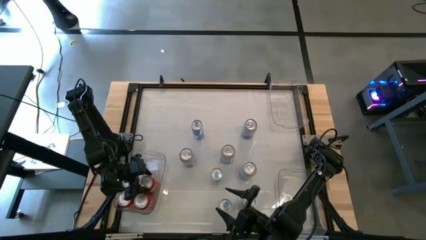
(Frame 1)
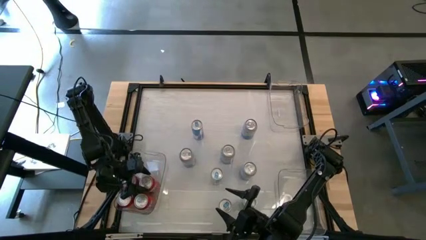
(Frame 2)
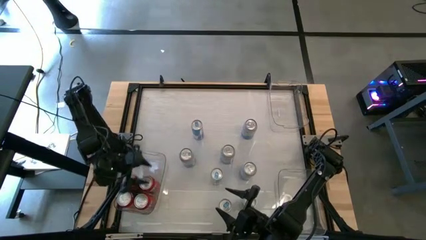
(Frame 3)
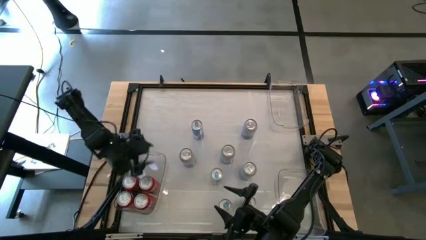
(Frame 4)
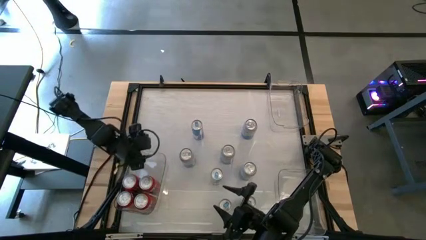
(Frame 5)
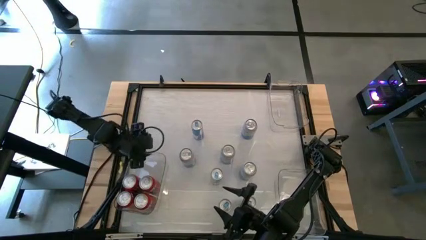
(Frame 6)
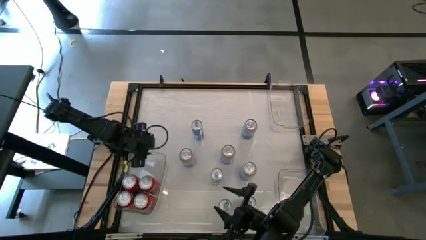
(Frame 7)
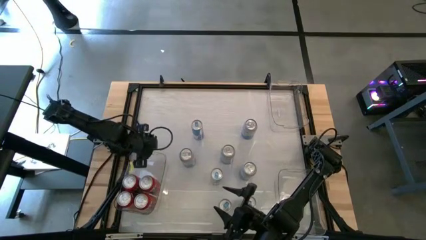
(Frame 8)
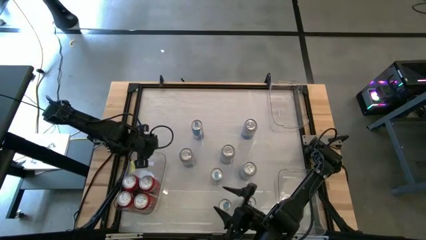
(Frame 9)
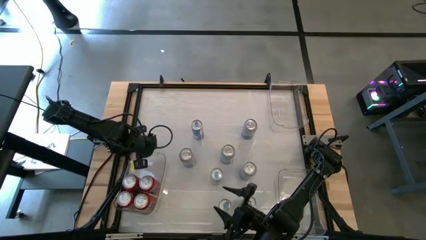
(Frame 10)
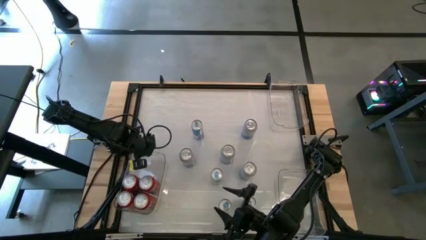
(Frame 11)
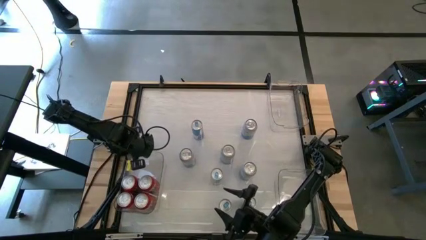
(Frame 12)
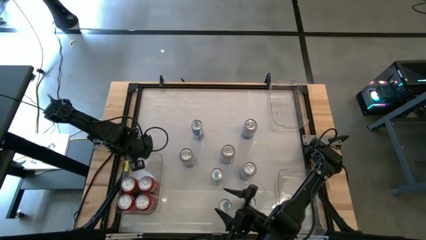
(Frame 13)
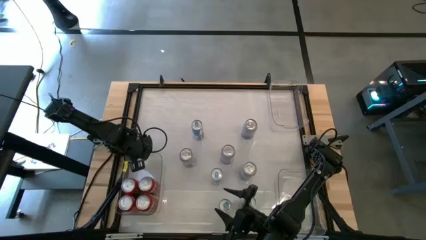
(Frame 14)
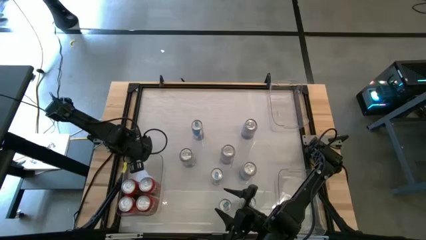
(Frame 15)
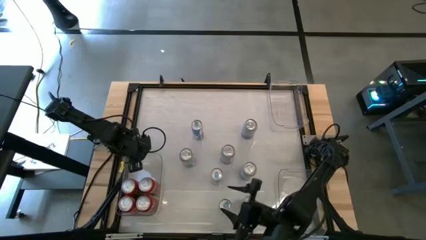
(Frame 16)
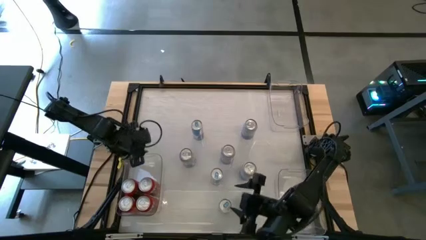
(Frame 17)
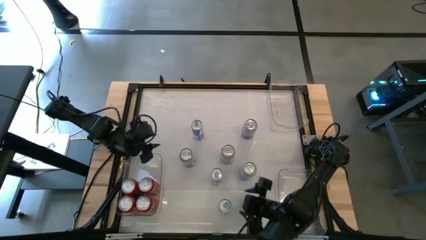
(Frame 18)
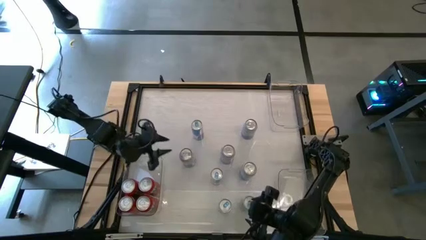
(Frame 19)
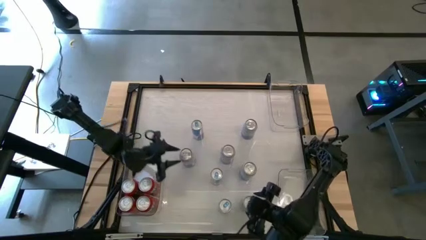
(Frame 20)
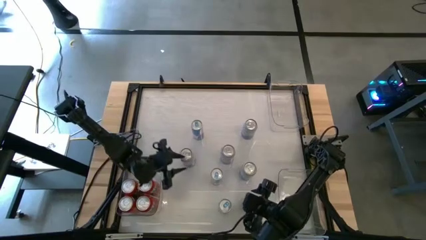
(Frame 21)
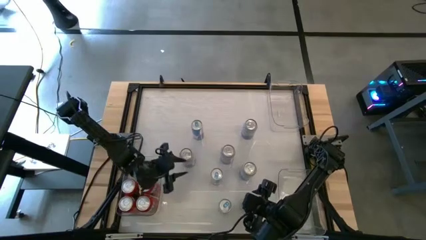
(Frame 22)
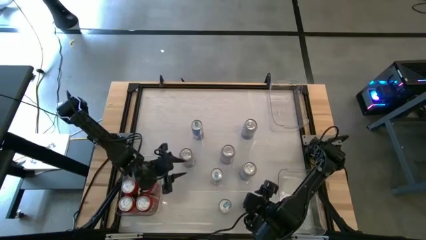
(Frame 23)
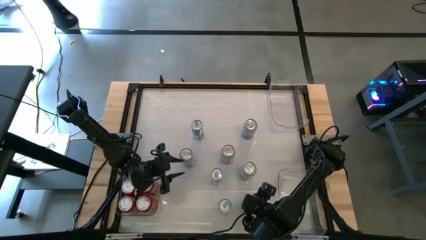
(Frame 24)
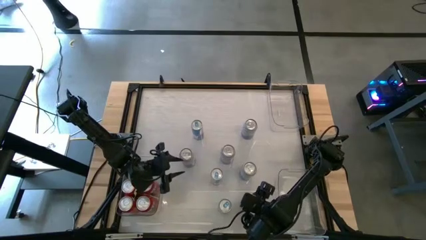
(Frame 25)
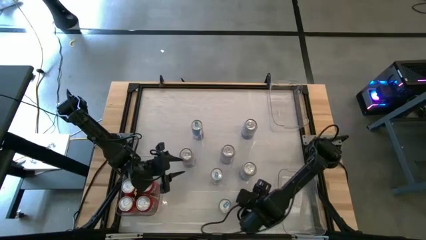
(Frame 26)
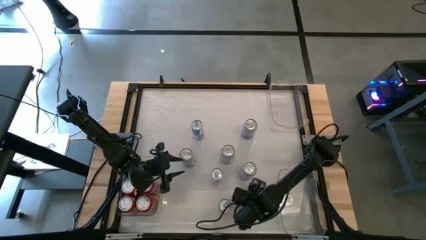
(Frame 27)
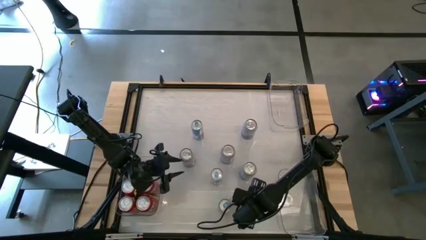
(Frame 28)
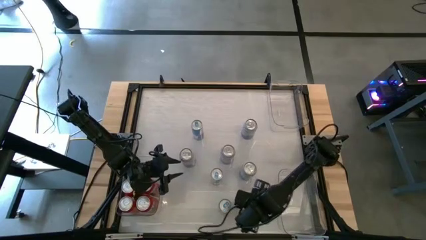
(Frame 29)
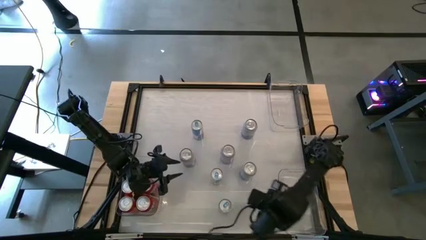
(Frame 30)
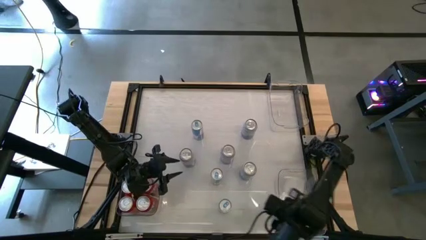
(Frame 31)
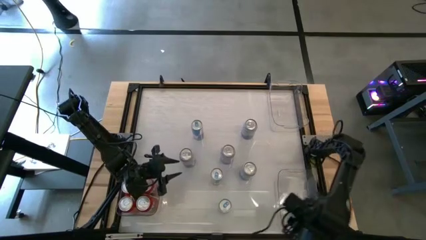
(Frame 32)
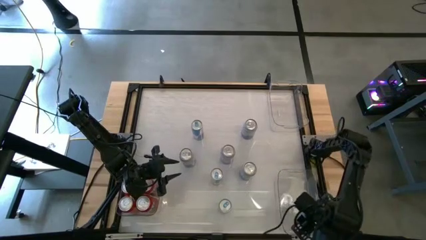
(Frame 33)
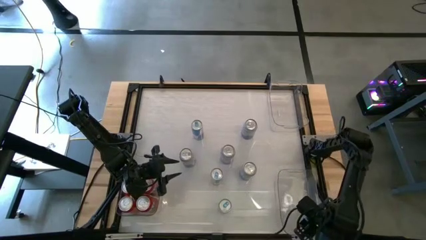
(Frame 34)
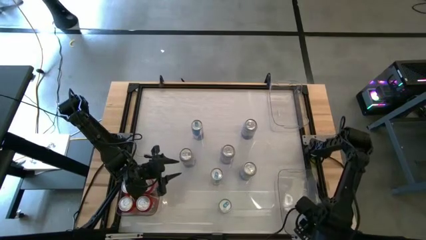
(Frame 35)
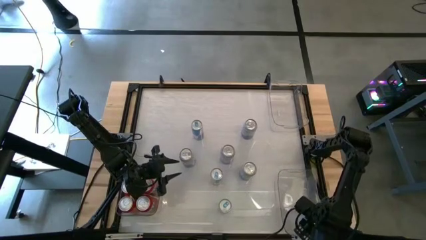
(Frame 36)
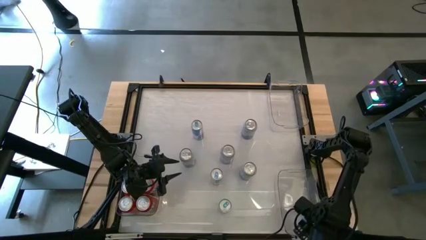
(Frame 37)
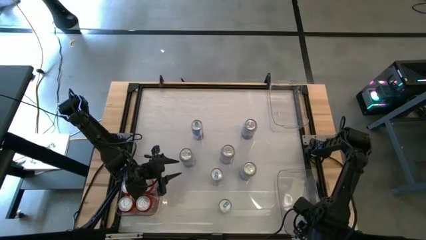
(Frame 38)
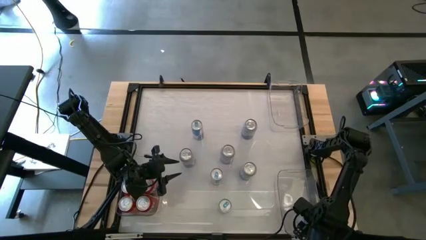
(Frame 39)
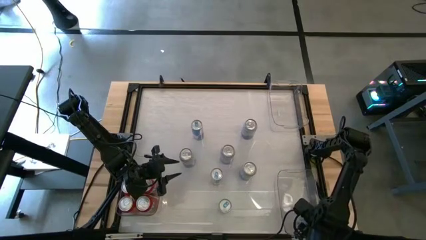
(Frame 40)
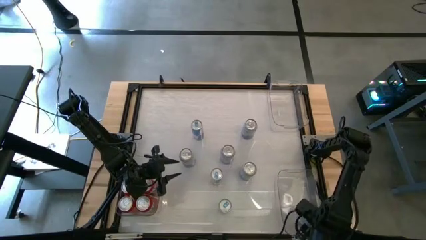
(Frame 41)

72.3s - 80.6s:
Task: Sort soda cans
Put the bottom right blue soda can into the bottom right transparent bin

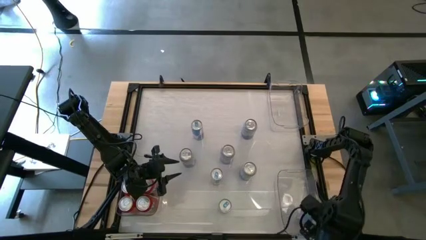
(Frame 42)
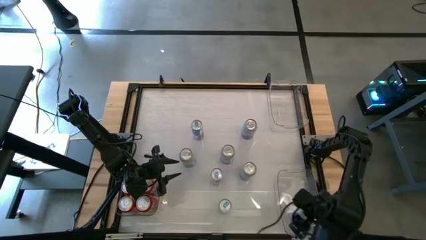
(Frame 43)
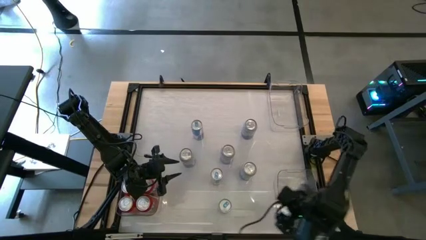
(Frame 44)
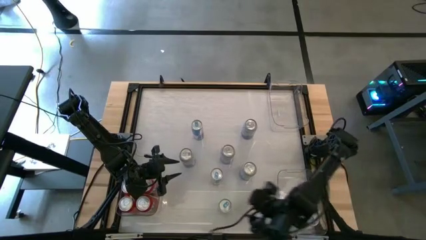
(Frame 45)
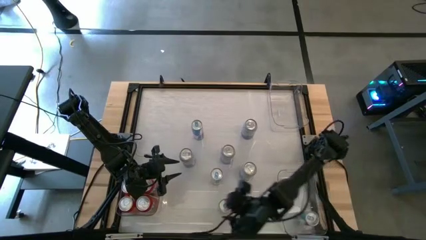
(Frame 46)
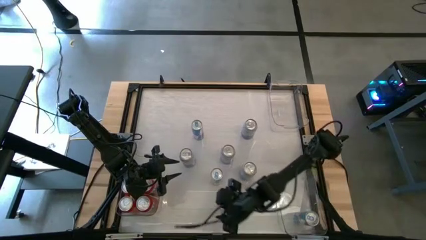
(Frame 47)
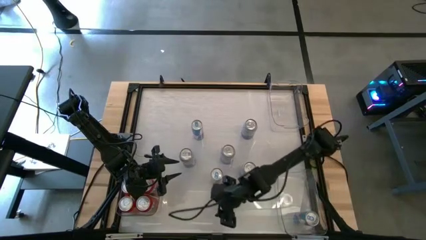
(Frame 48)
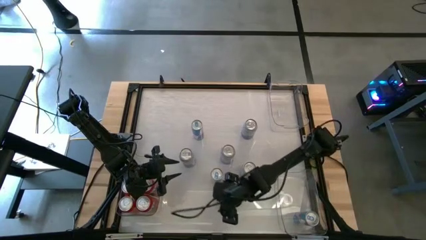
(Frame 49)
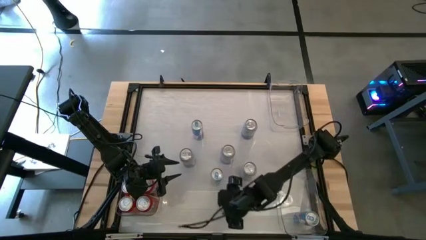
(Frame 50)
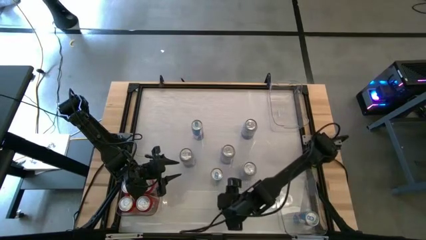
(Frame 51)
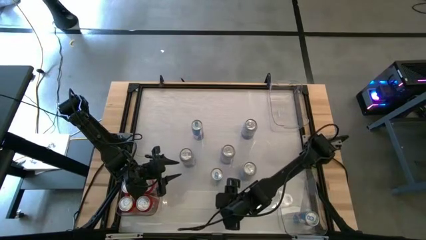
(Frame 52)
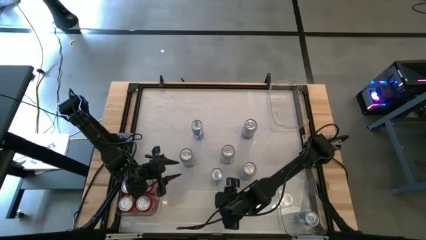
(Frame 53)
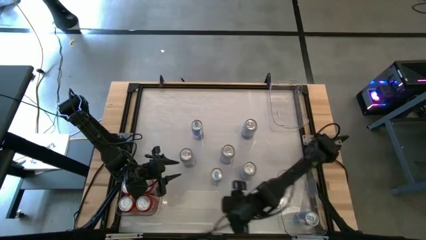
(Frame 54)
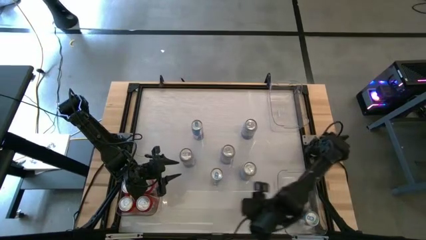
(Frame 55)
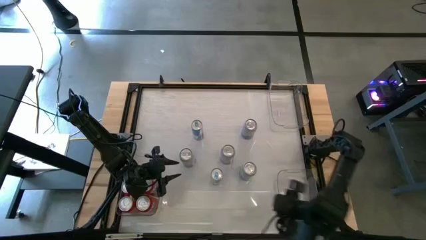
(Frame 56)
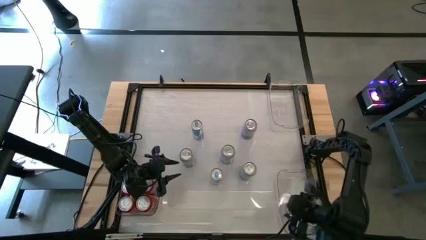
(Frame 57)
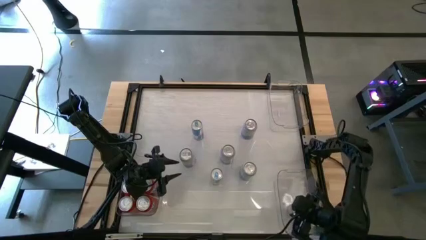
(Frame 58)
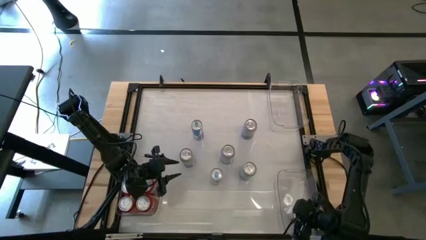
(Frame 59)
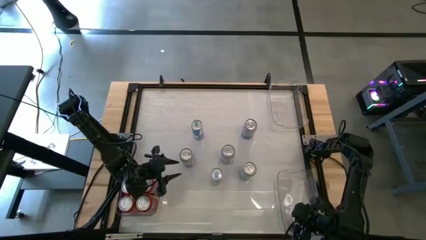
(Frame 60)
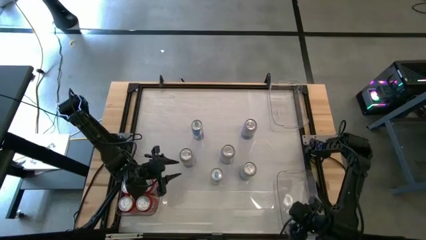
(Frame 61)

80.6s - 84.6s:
Put the bottom left blue soda can into the bottom right transparent bin

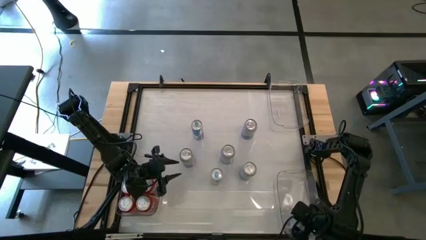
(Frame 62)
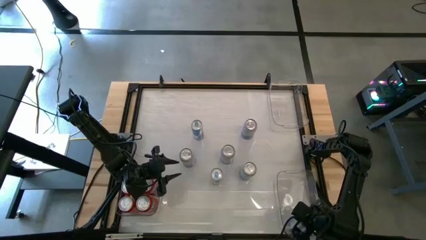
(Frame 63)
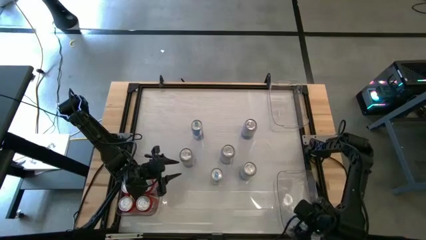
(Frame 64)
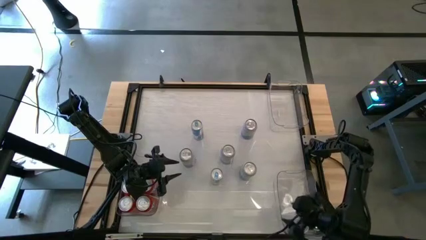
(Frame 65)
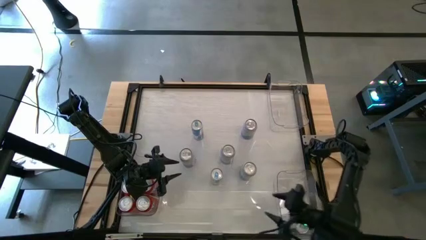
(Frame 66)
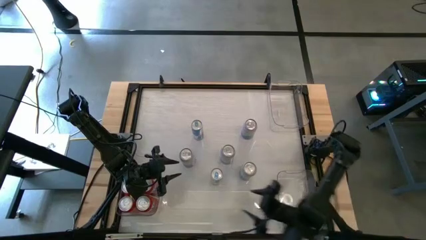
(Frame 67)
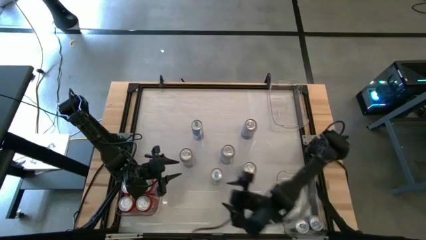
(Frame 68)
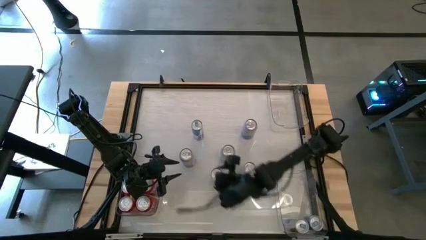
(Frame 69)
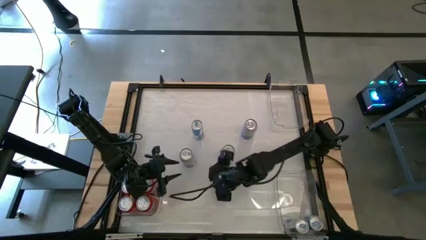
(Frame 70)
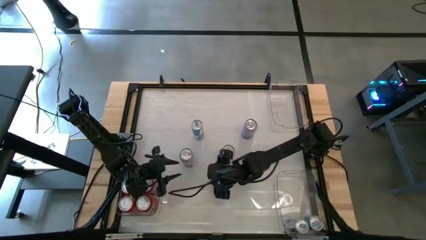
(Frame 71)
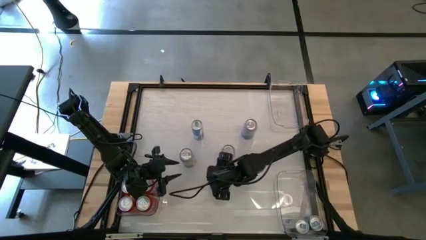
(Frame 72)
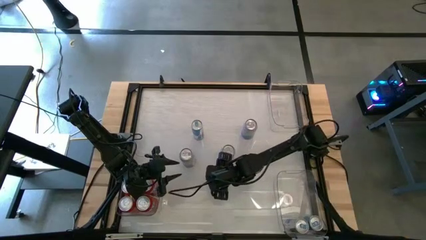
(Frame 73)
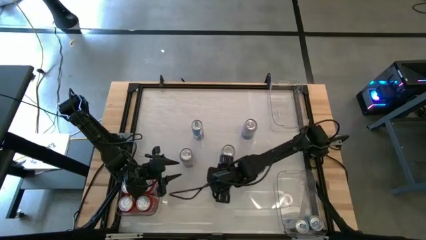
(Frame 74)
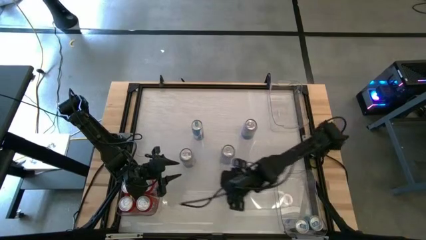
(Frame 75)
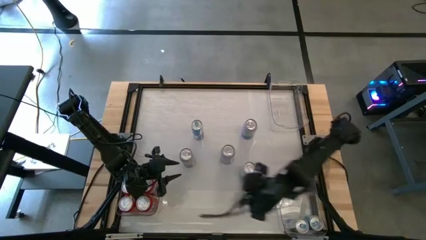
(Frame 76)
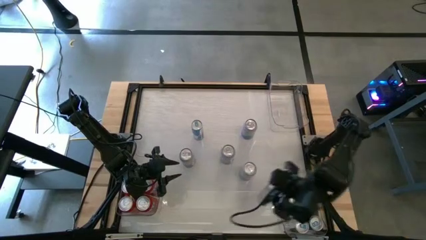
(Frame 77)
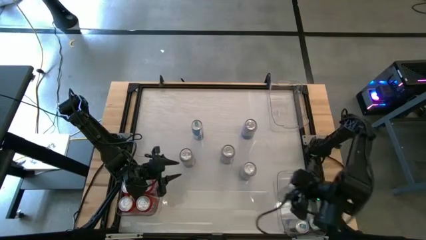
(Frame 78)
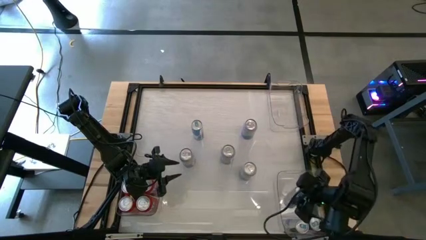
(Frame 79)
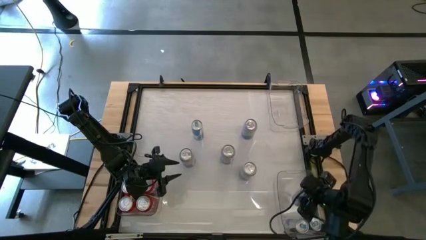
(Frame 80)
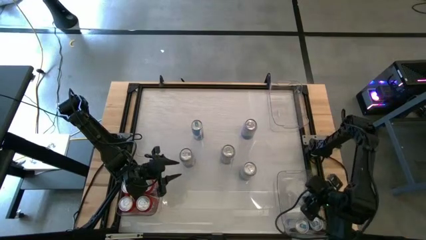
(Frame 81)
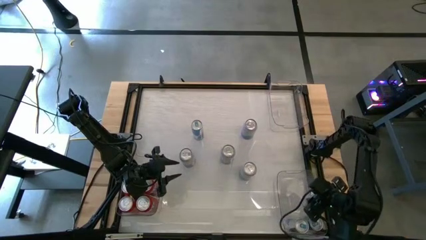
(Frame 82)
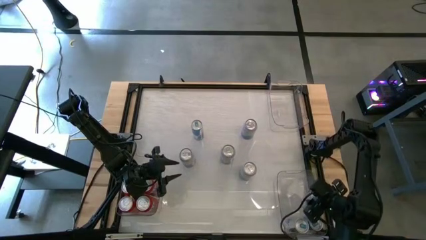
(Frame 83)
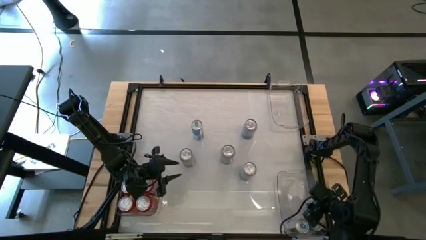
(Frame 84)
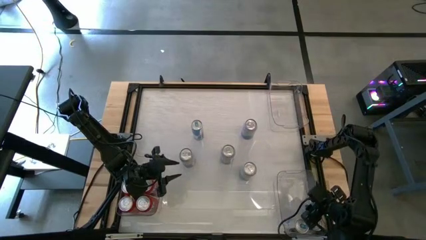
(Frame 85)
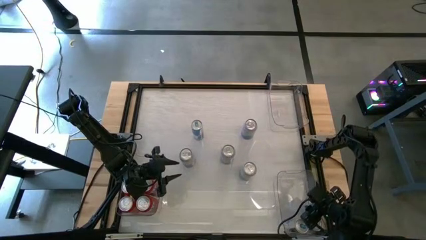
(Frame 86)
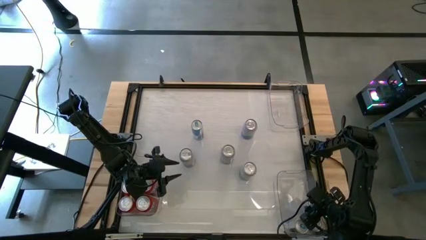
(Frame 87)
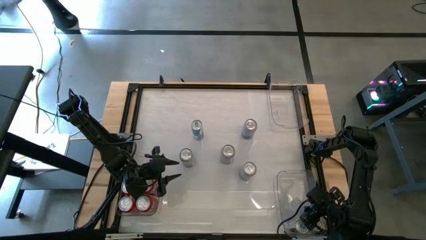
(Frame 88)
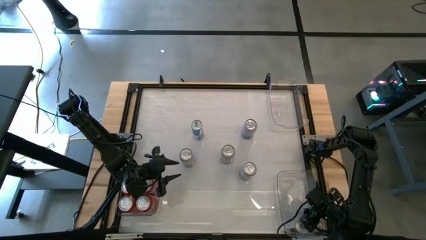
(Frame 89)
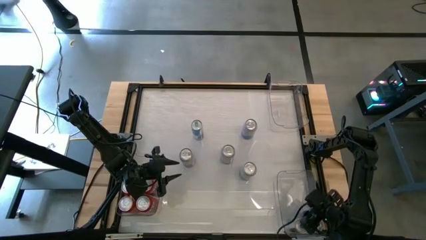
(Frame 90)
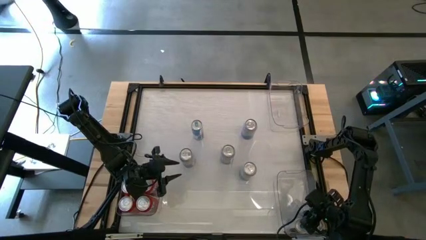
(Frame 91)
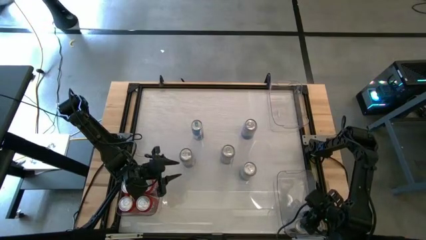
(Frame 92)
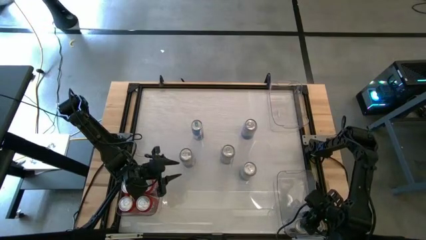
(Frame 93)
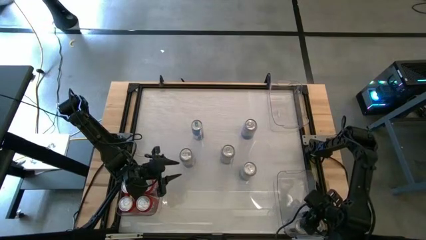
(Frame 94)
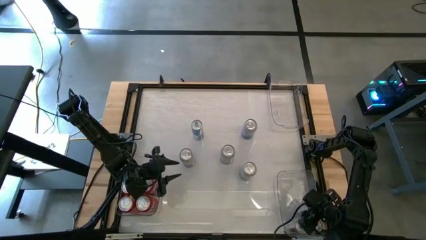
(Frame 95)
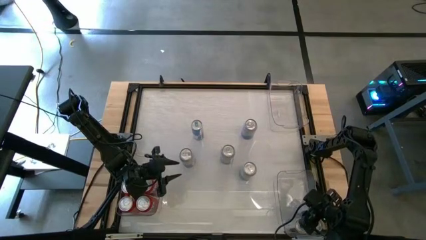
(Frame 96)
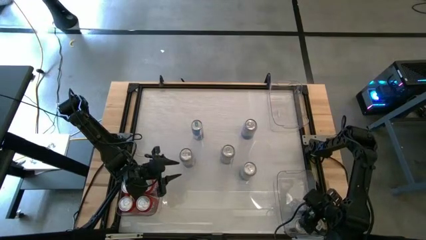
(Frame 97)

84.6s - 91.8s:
Put the center blue soda can into the bottom right transparent bin
